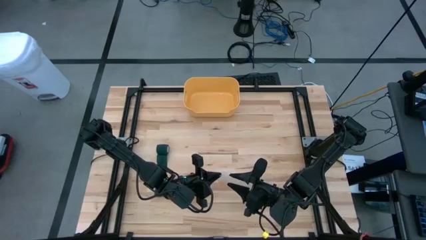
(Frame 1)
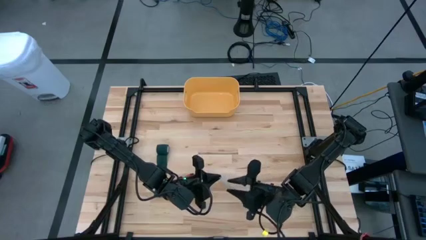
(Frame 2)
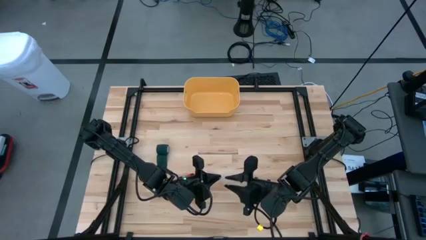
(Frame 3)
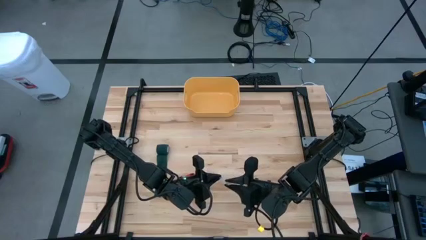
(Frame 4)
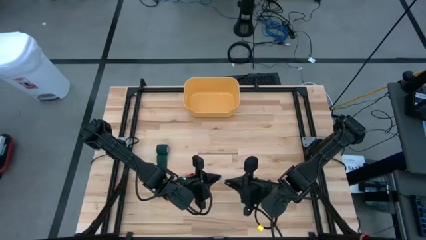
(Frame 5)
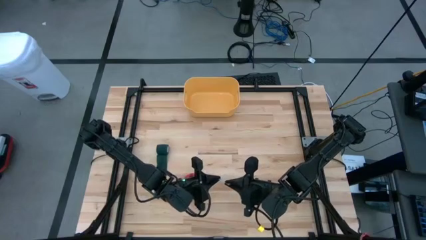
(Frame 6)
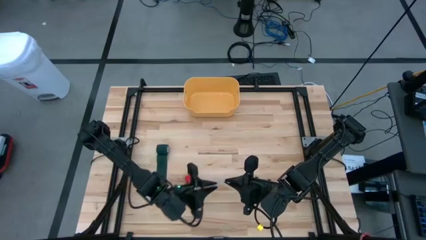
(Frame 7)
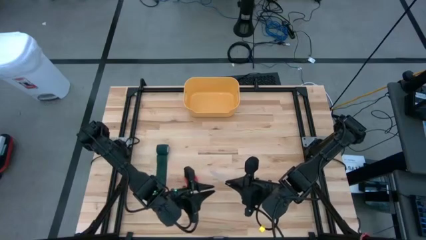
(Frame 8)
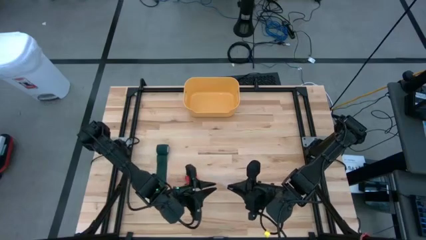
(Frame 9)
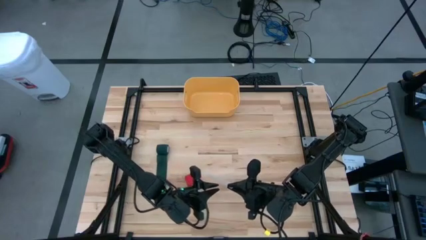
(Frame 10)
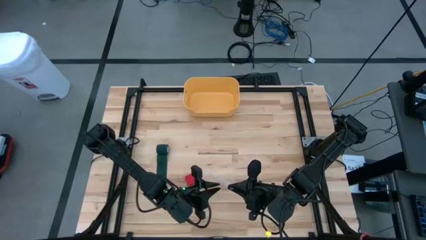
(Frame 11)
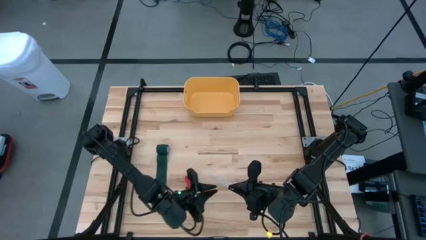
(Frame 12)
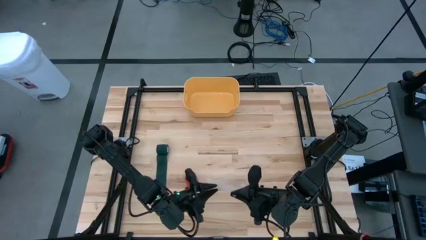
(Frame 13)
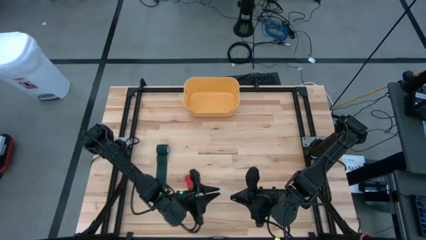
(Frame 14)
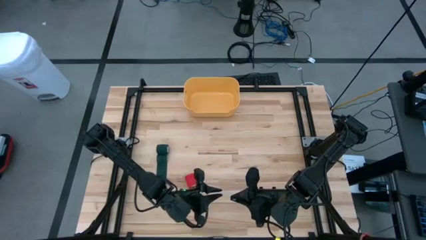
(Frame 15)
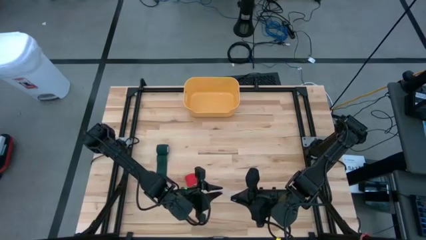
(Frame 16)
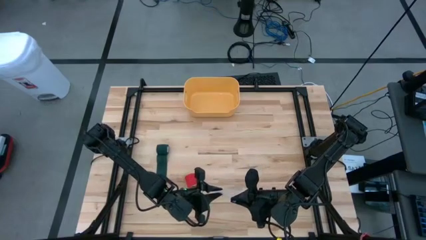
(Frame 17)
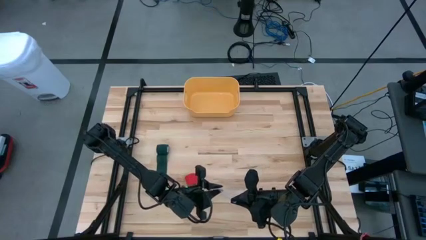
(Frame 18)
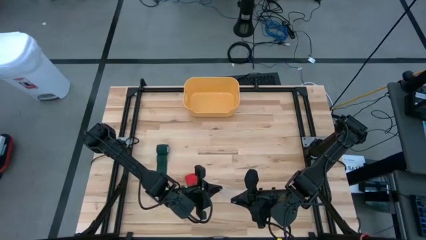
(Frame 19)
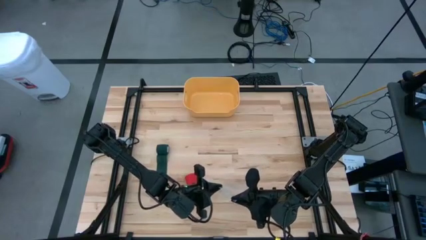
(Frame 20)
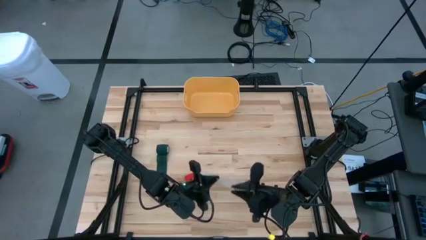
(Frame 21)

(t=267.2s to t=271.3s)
Task: Roll bandage
Open the transparent zip bag

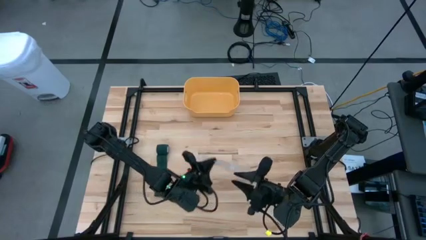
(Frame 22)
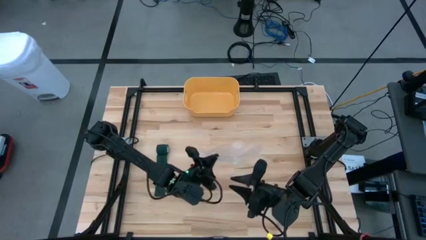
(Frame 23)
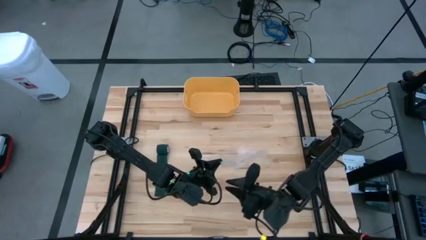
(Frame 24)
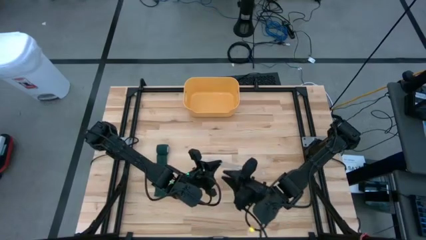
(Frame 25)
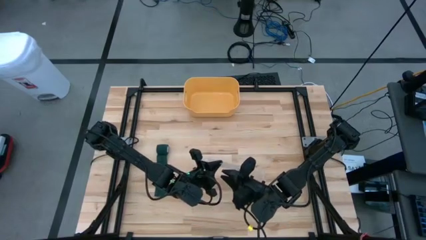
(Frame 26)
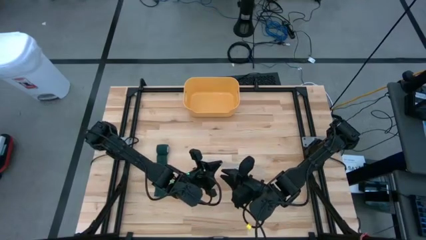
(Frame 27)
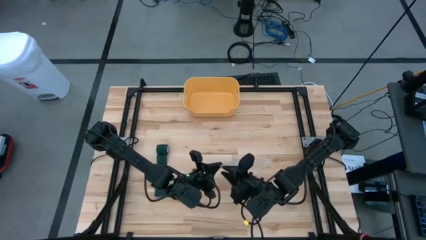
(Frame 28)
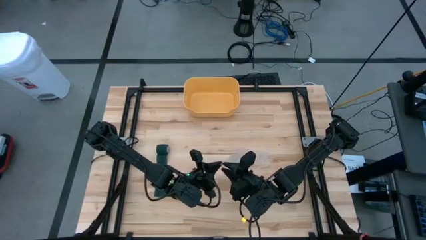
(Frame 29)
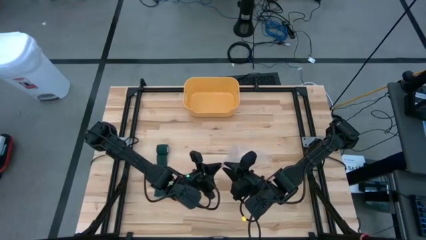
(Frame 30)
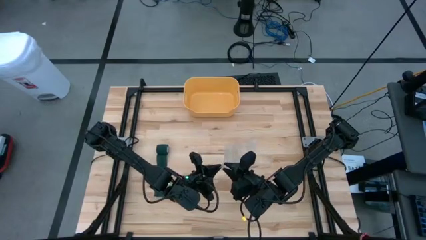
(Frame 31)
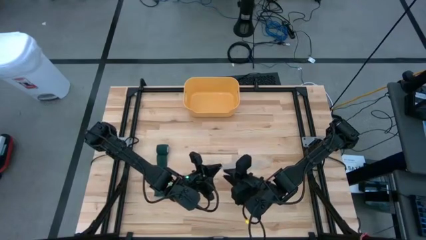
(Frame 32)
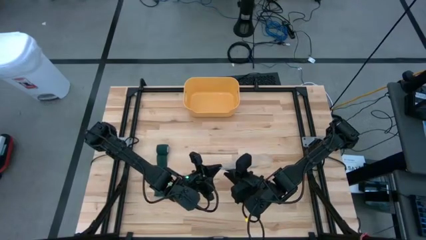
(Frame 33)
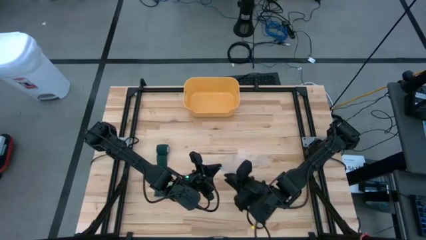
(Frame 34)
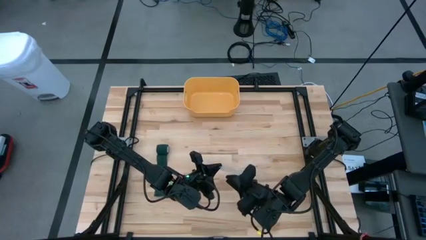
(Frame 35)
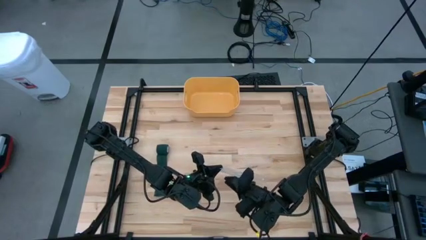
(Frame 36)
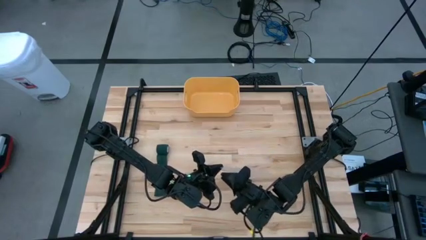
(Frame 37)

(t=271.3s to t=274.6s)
Open the transparent zip bag

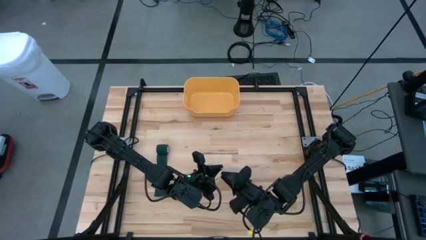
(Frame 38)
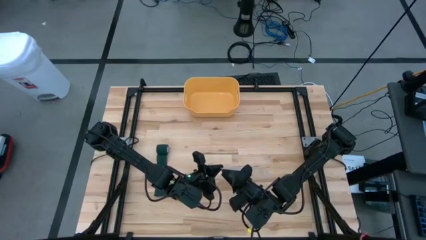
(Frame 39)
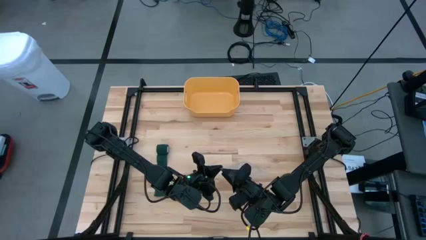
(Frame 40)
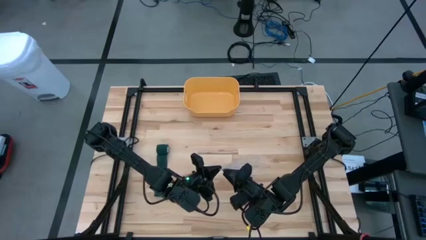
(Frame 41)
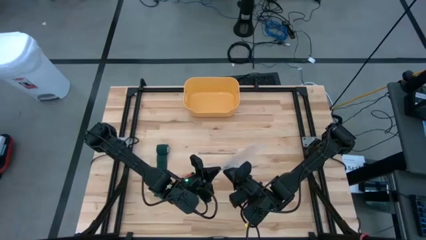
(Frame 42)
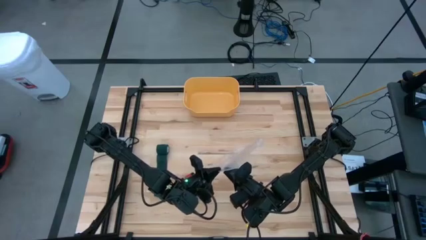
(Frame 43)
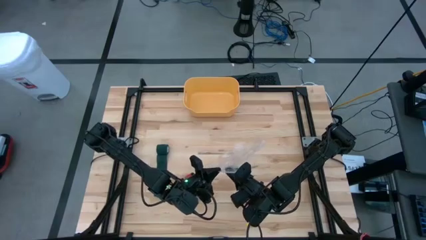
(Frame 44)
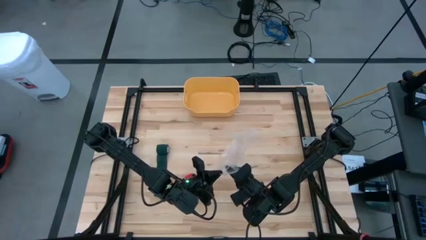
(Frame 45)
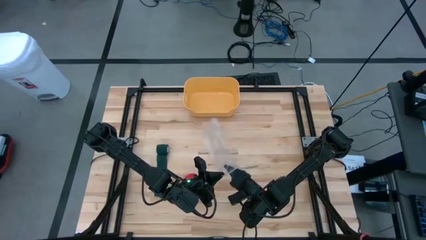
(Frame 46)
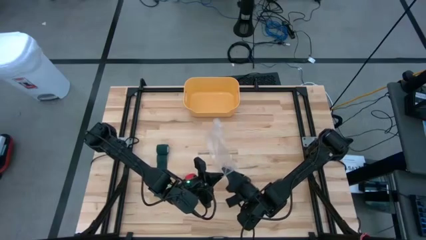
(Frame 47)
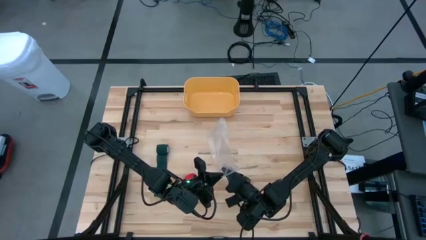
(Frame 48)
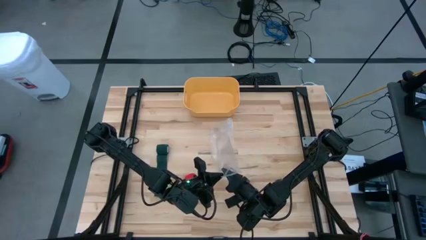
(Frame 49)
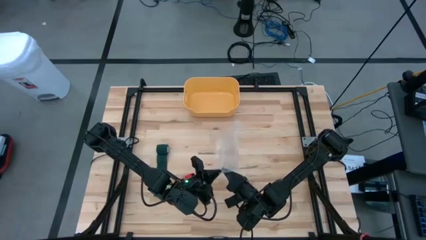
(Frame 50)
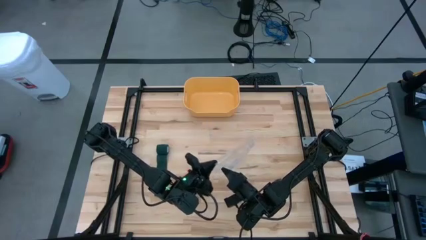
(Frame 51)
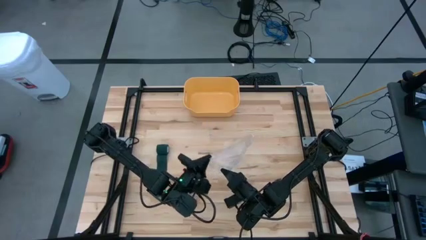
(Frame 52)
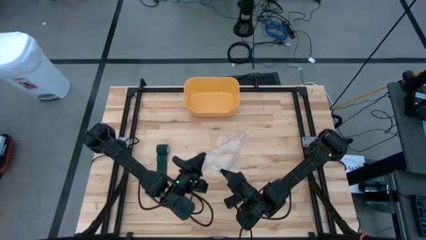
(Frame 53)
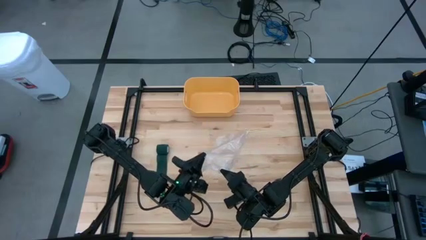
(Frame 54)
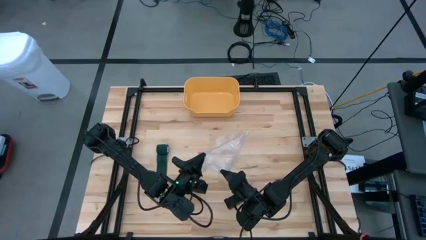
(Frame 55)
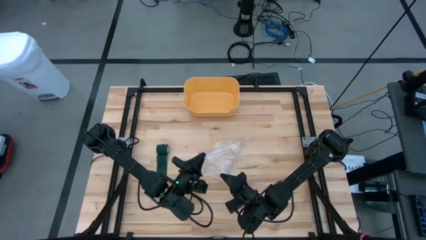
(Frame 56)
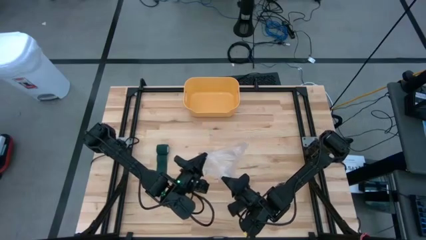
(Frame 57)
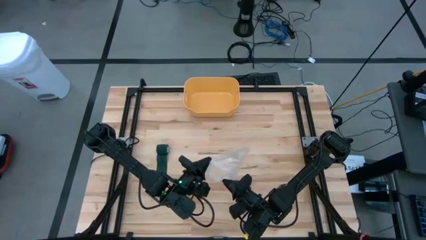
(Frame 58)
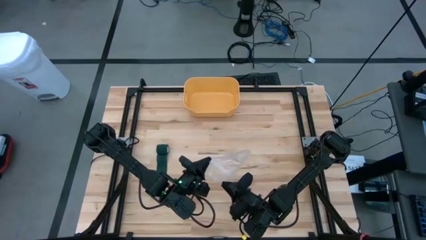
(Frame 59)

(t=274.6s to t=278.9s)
Open the transparent zip bag

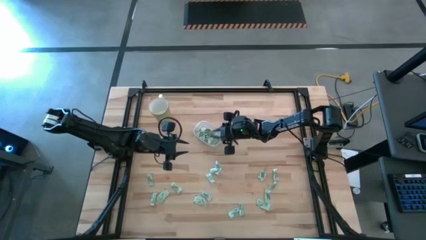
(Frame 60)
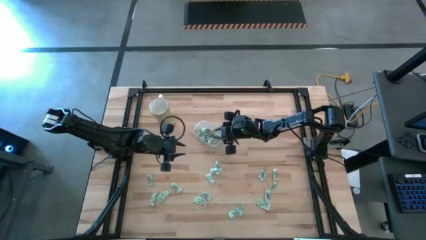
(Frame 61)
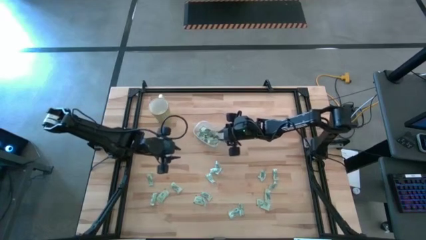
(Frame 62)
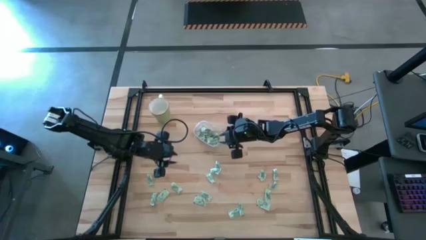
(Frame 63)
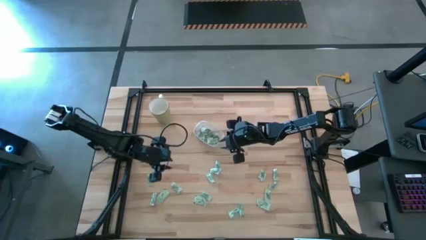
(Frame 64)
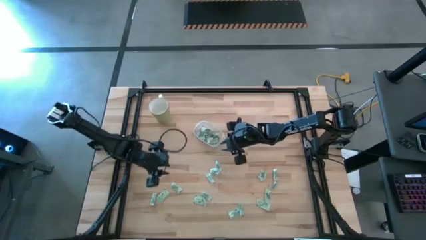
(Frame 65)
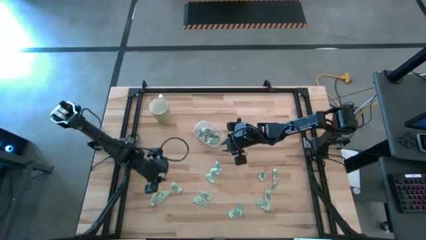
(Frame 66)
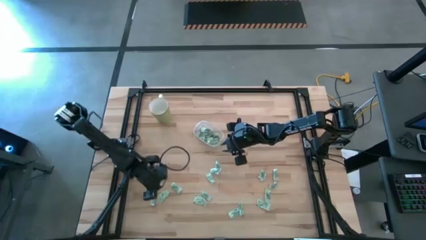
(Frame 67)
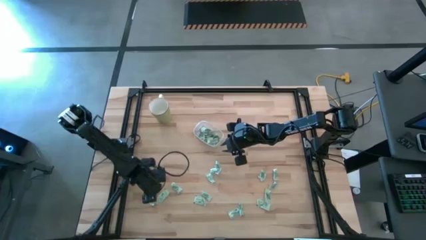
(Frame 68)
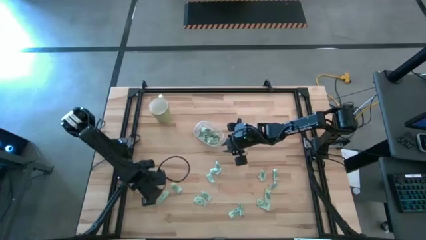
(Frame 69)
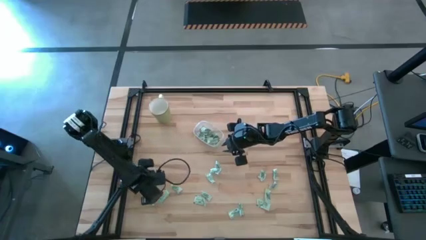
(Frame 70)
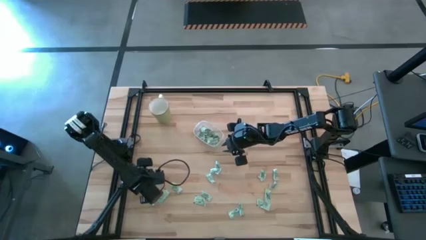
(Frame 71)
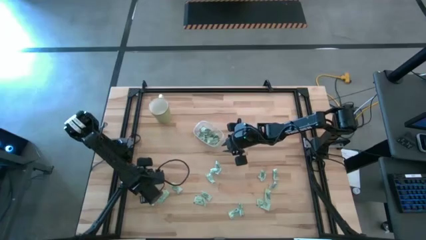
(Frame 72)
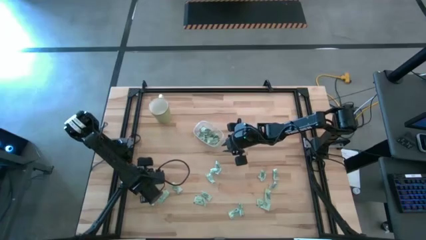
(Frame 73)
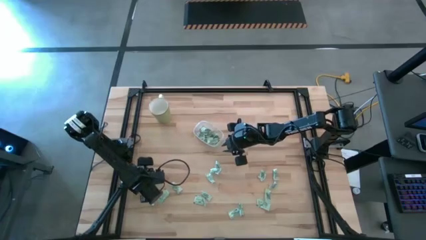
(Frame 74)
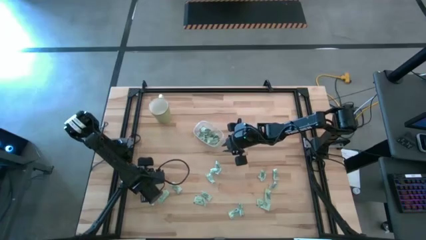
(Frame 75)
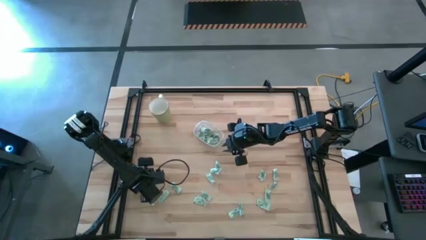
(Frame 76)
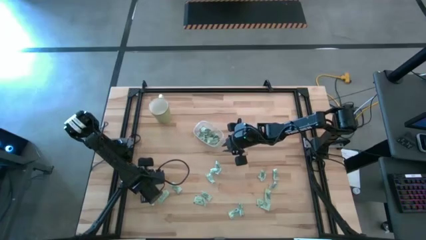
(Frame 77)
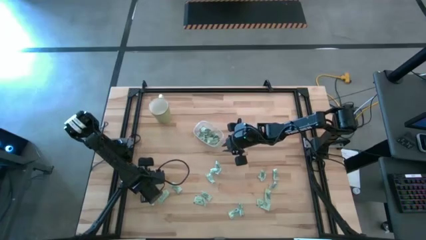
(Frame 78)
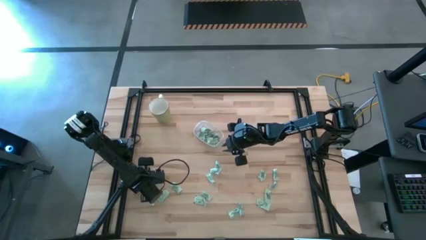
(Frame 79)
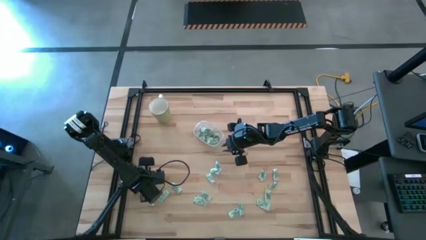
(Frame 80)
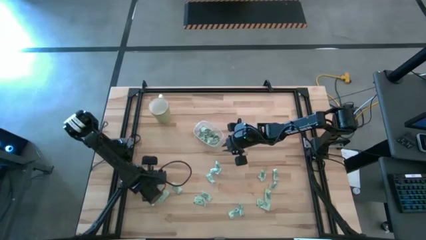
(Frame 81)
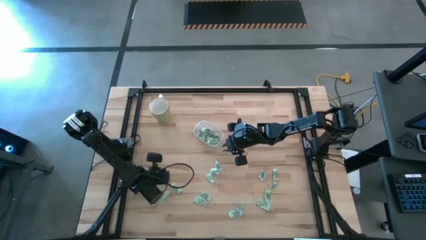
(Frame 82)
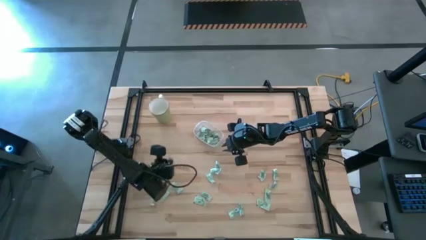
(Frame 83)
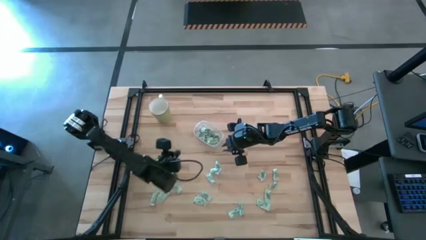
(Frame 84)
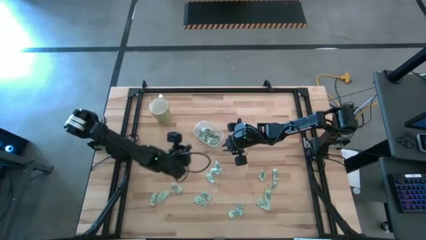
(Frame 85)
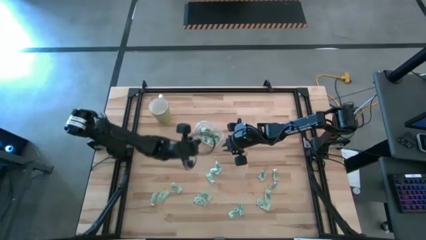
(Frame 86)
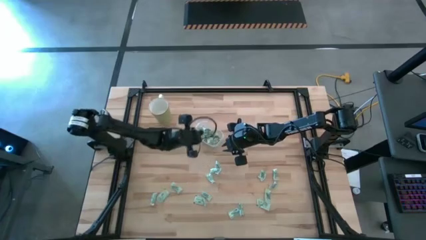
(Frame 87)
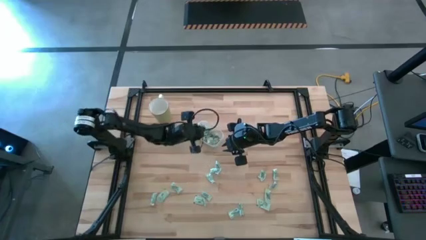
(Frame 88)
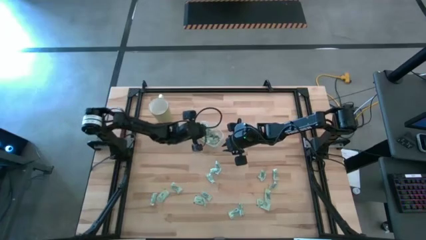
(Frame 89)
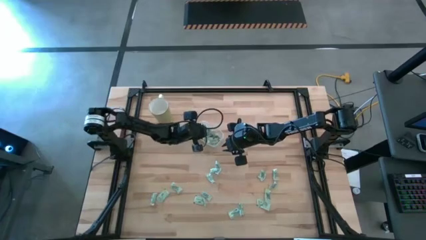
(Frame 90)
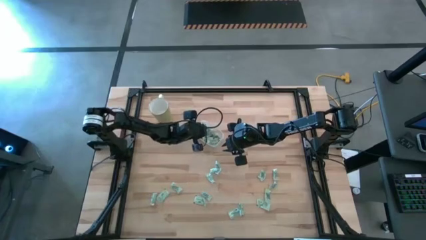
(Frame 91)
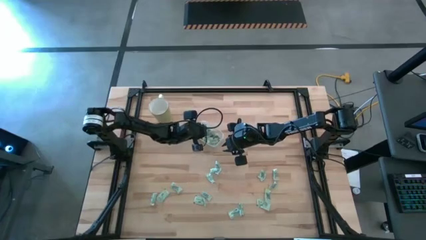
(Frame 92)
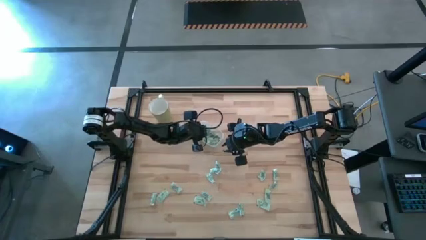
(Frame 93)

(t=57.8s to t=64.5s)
Task: Pick and place Stevia / Truvia into bins
Put the stevia packet into the transparent container
